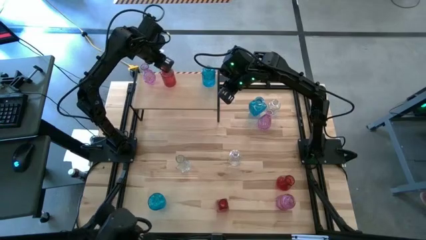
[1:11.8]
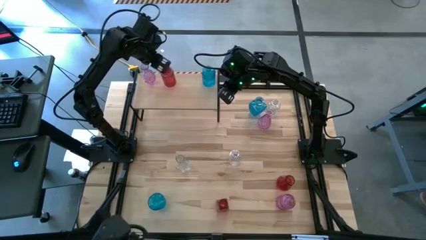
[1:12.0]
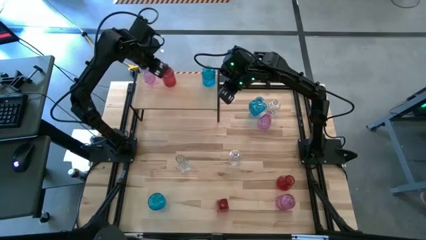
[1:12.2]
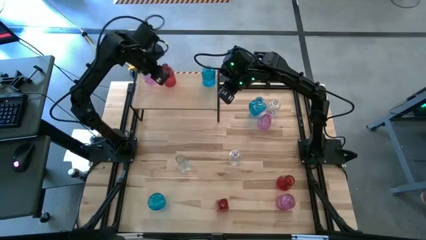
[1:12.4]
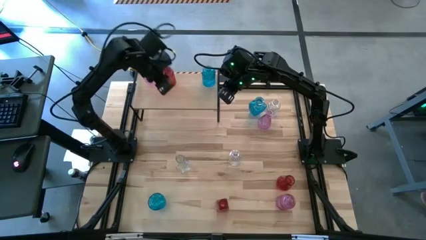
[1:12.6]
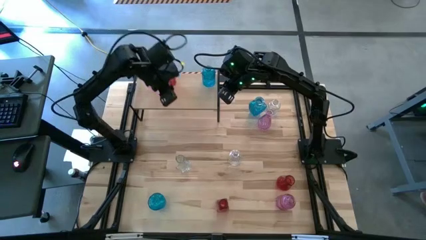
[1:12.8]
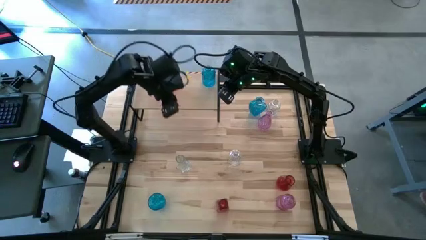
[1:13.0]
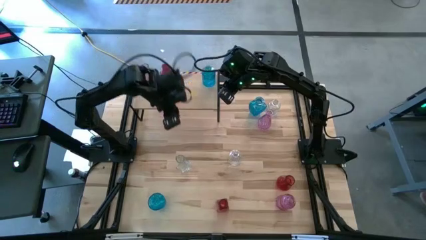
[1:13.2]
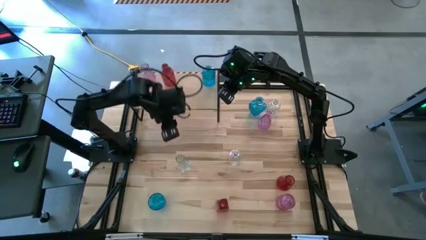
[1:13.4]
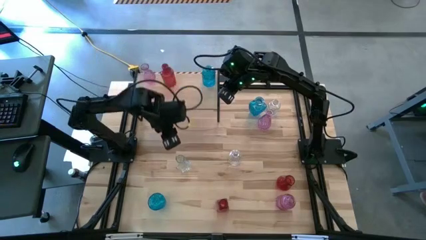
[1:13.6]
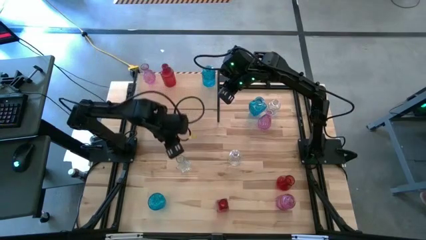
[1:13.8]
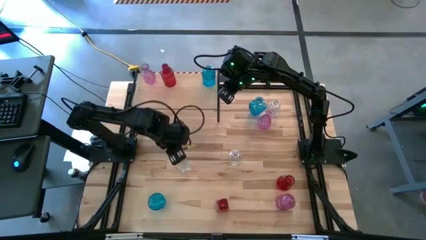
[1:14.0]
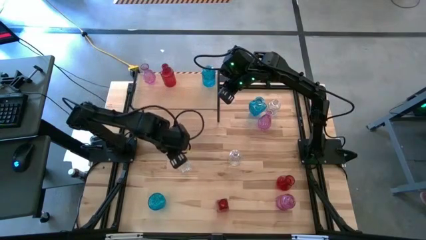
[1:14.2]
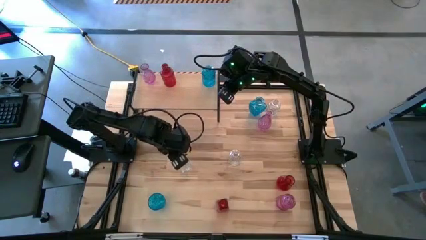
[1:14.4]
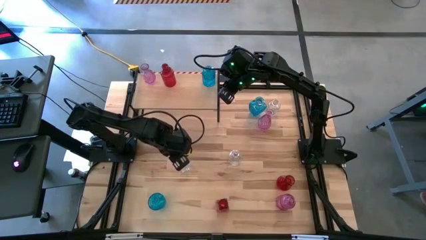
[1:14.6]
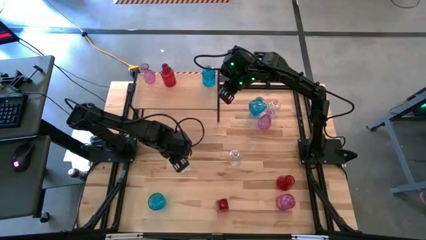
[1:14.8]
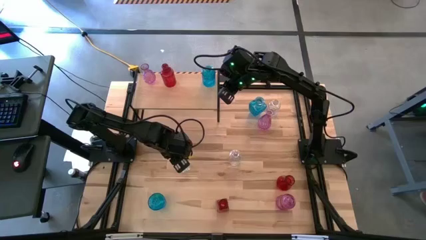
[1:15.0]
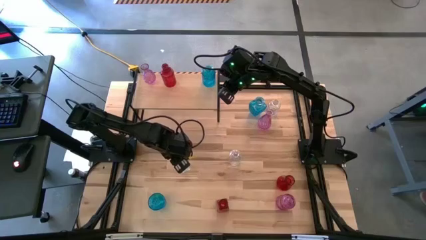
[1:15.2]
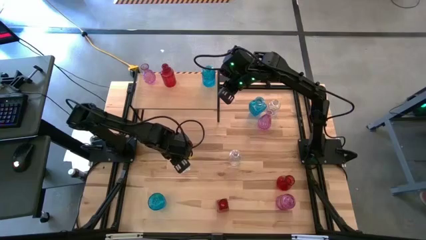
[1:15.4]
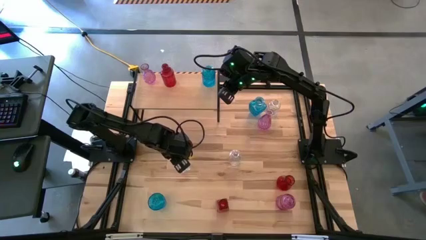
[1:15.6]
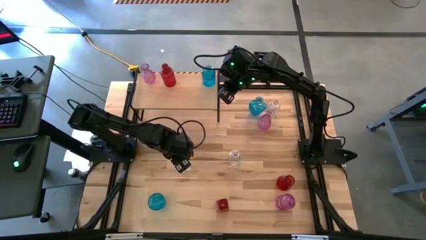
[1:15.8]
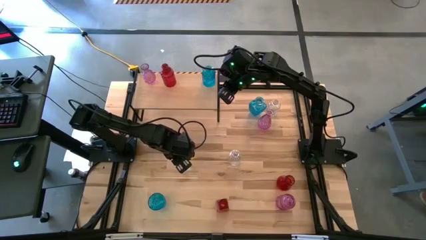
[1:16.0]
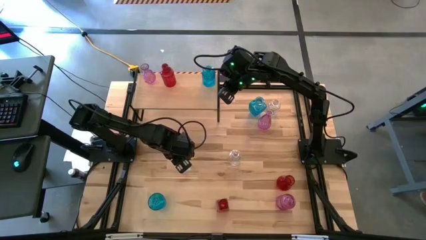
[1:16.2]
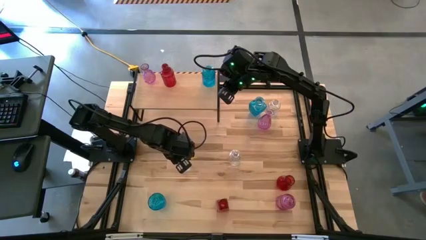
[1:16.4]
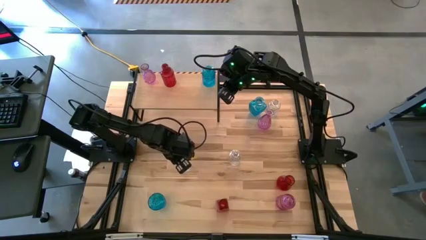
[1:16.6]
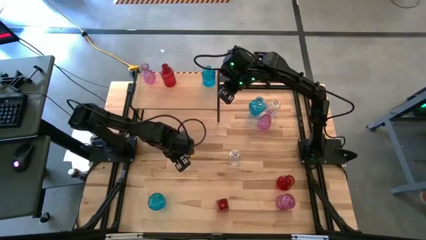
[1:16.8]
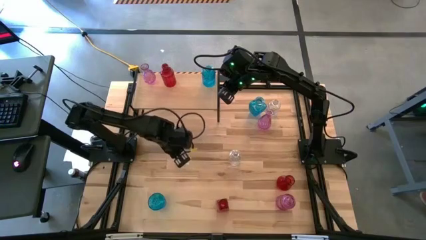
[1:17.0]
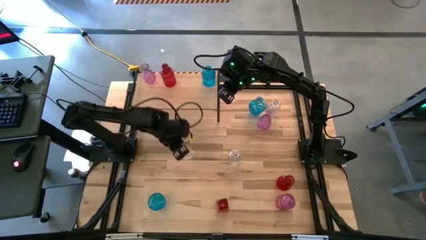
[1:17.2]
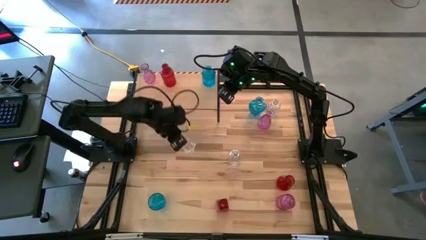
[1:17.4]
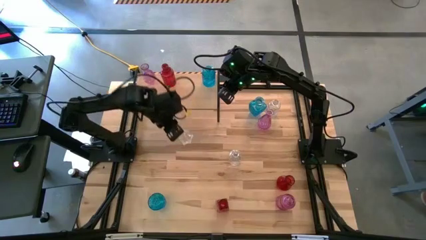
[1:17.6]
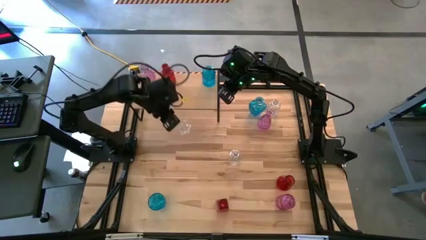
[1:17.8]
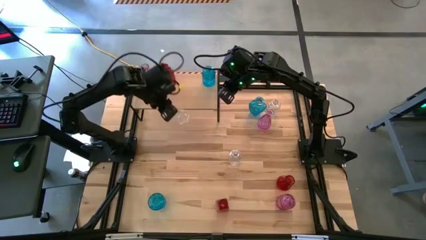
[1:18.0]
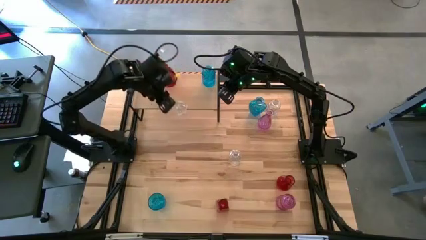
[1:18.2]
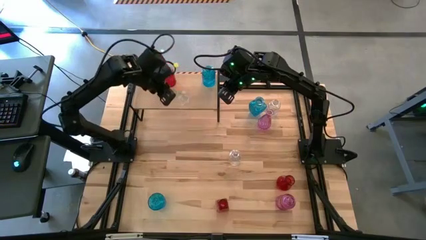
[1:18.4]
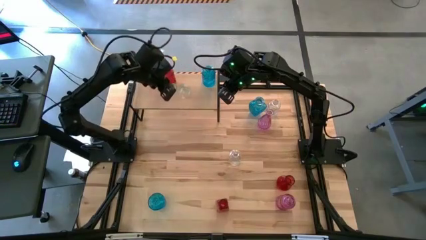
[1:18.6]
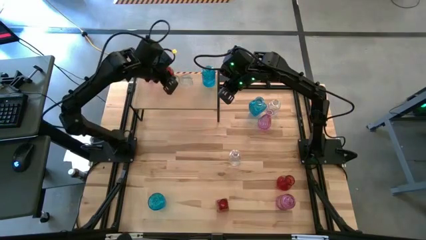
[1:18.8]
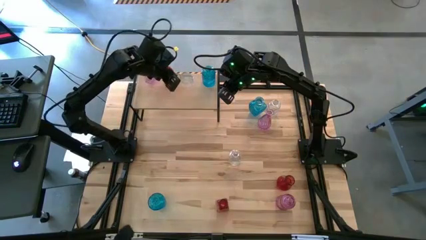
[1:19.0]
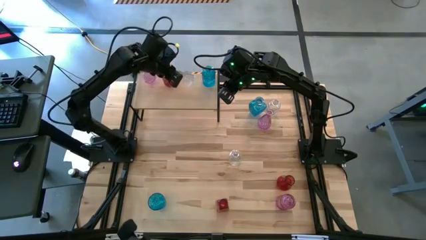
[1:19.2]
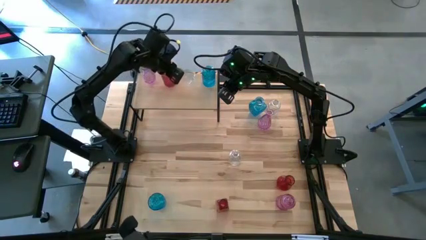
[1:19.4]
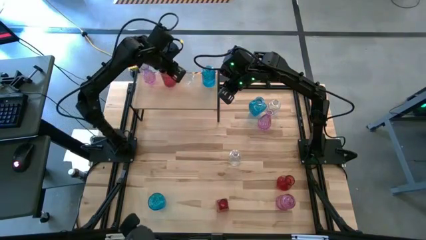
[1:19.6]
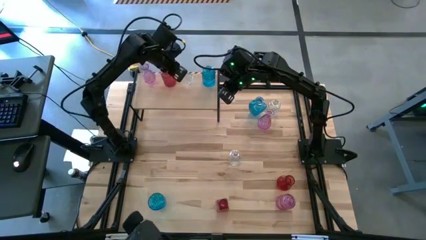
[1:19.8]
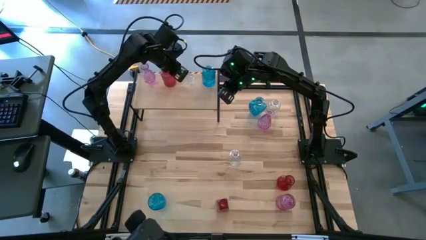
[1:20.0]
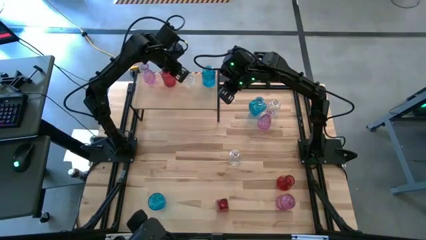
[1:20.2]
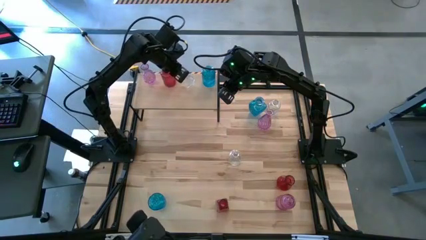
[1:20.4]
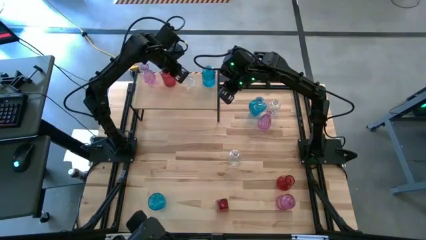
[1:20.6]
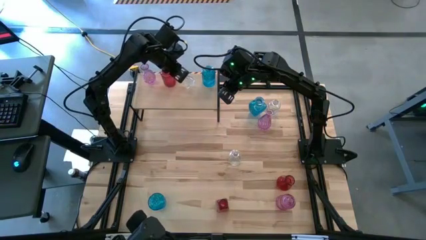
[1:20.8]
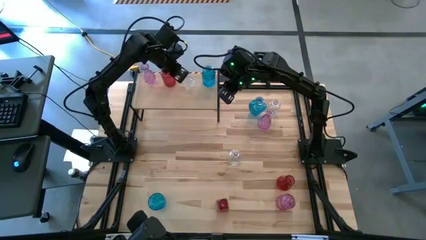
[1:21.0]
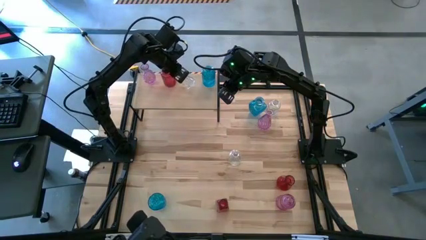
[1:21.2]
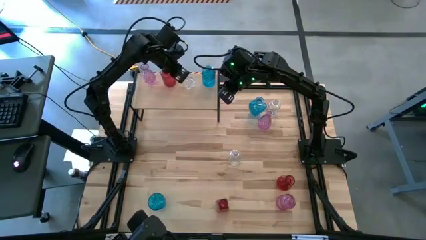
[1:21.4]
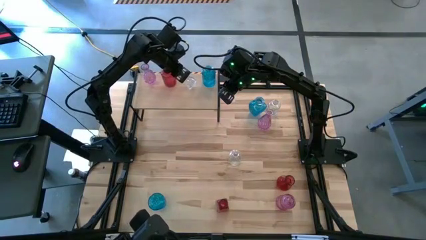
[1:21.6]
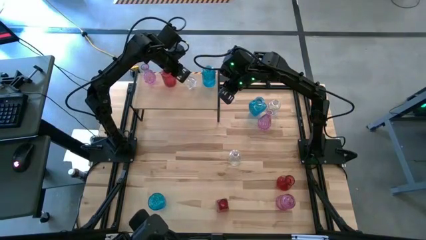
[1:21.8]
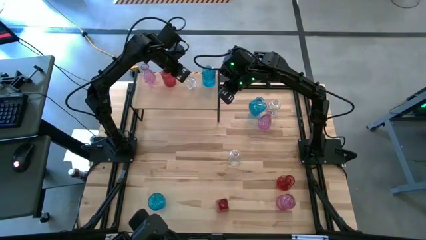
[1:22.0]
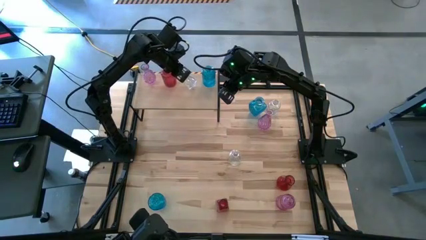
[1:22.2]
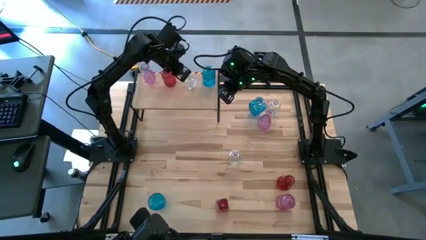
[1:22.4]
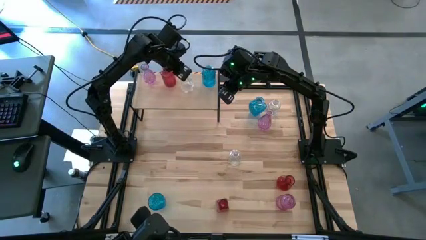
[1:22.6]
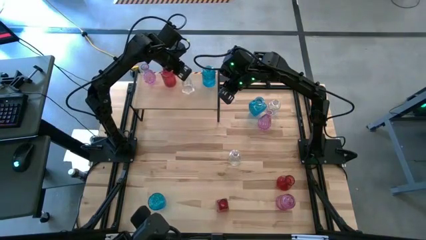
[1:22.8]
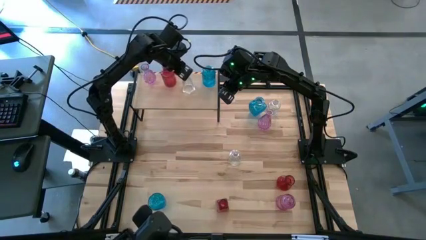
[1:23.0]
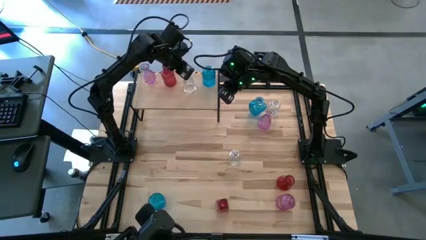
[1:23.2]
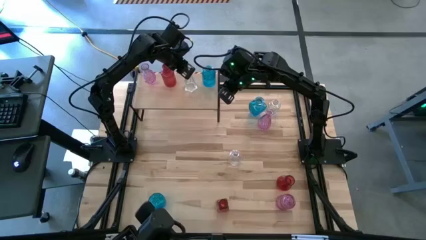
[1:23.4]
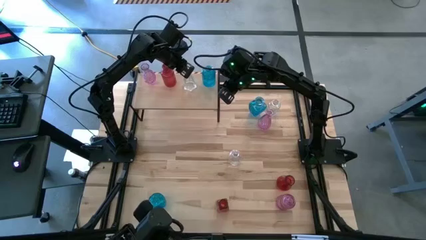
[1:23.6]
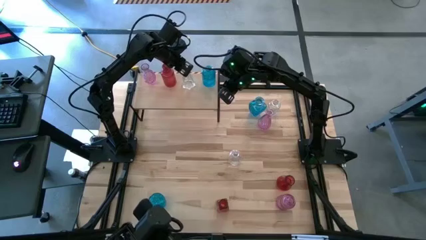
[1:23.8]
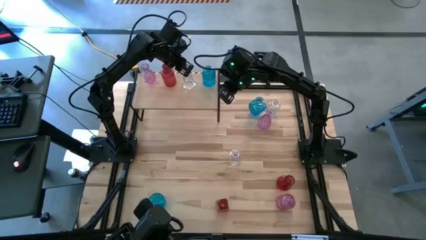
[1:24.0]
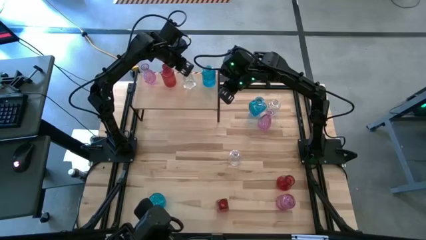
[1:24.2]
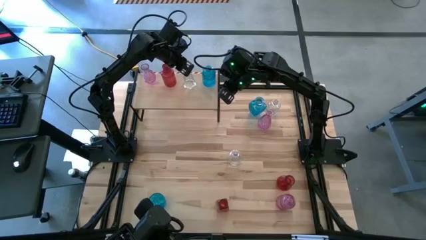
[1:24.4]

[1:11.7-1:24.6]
Task: sort vases onto shelf
Put the bottom left transparent vase on the shelf

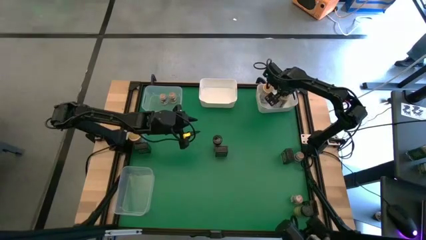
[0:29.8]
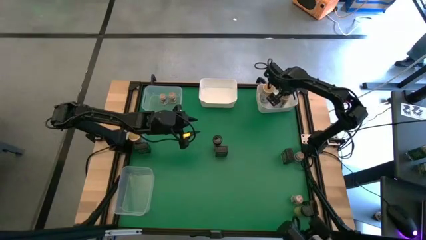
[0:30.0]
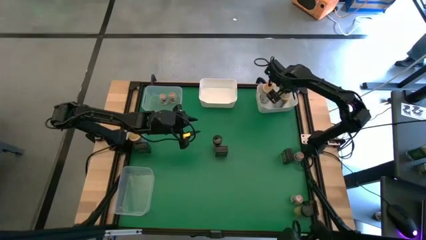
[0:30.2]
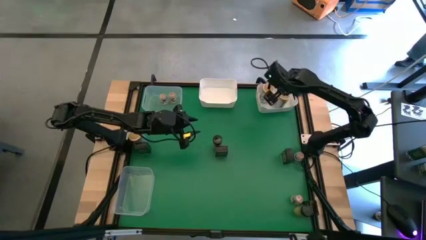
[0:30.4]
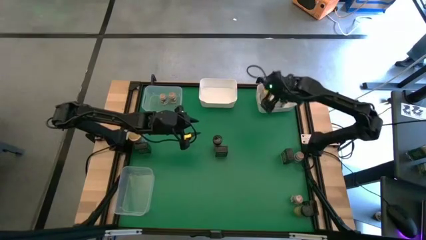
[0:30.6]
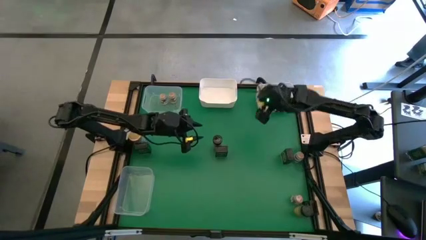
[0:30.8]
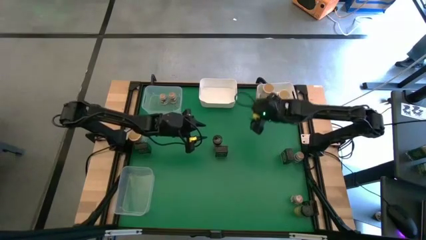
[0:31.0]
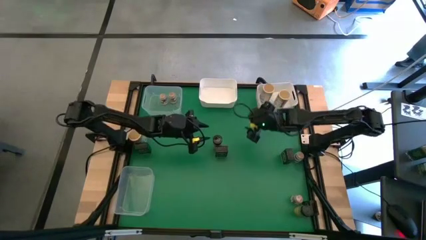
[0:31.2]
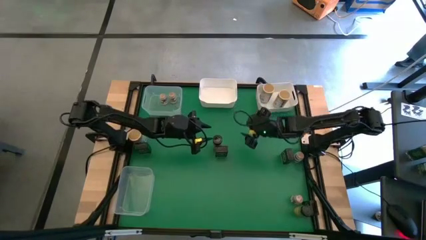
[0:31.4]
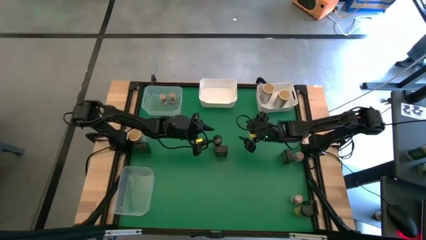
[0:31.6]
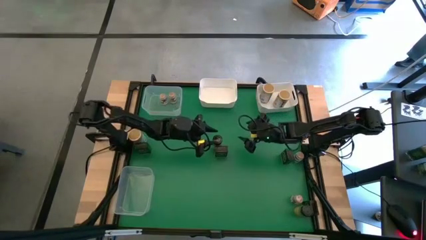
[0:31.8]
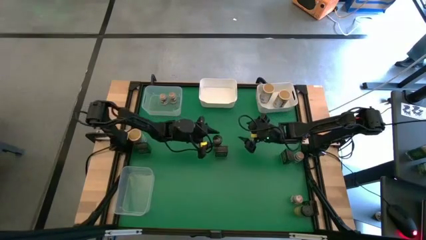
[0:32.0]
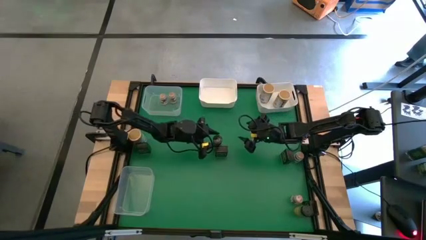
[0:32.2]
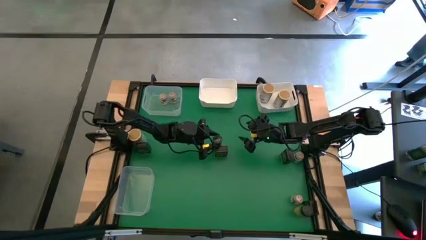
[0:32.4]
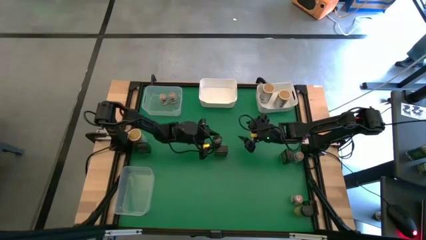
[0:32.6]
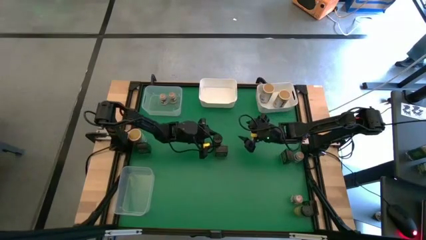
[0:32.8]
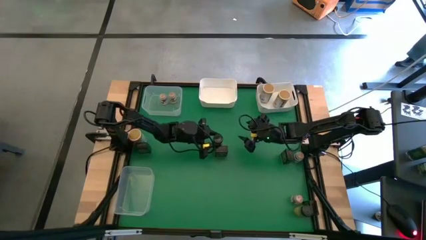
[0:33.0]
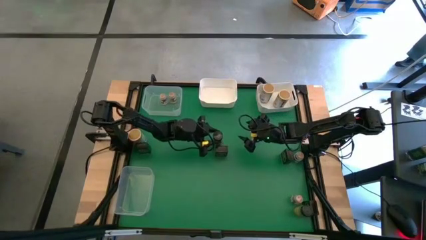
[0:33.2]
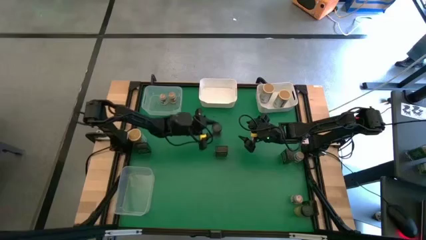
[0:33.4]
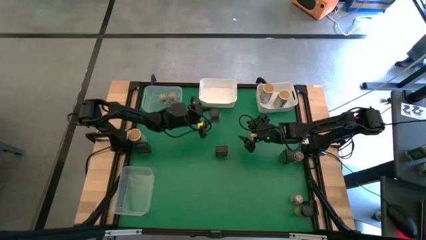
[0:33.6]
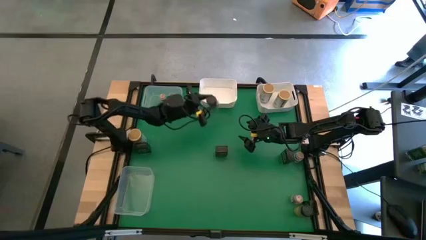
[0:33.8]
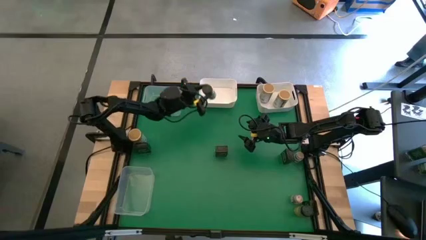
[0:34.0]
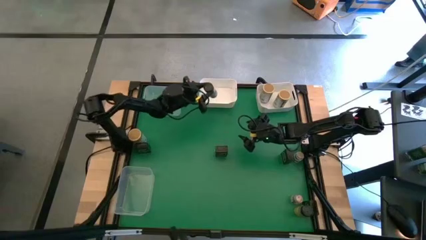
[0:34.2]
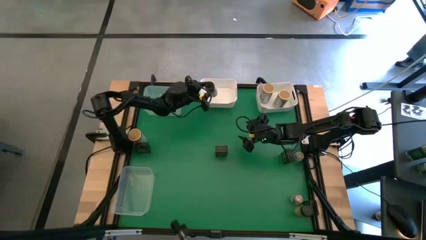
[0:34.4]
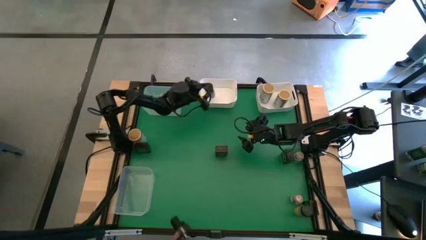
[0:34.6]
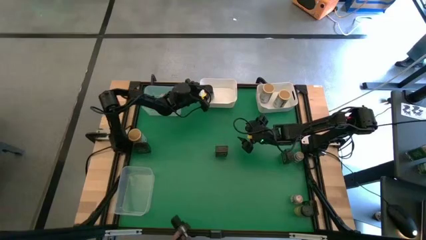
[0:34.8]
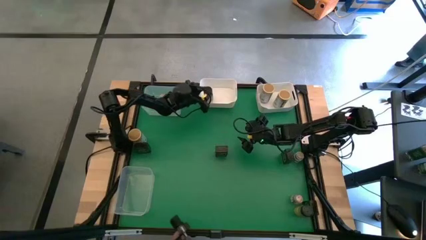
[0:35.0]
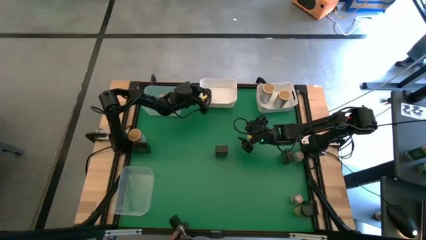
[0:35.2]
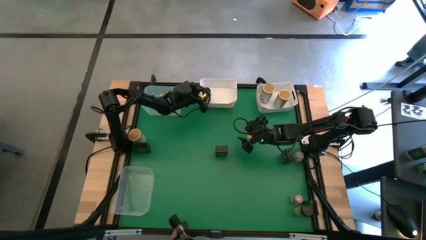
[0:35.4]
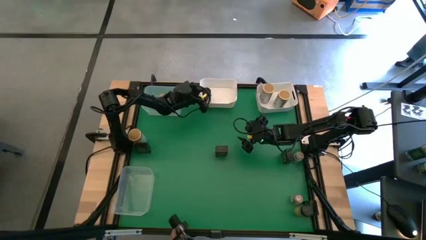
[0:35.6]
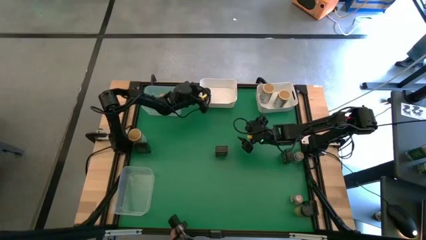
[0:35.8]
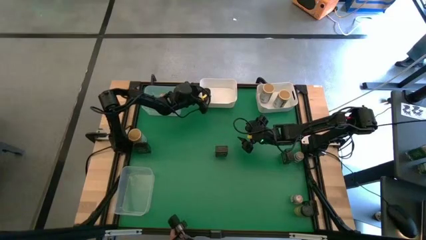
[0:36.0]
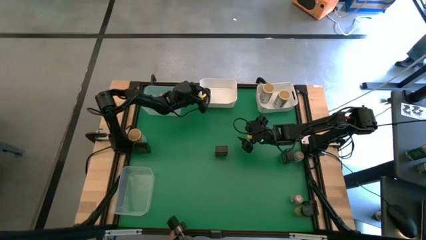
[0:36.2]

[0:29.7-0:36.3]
Task: Sort spices by type
Put the black seasoning bottle into the left white bin
